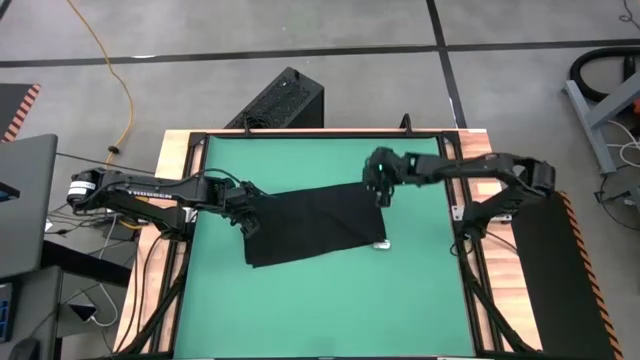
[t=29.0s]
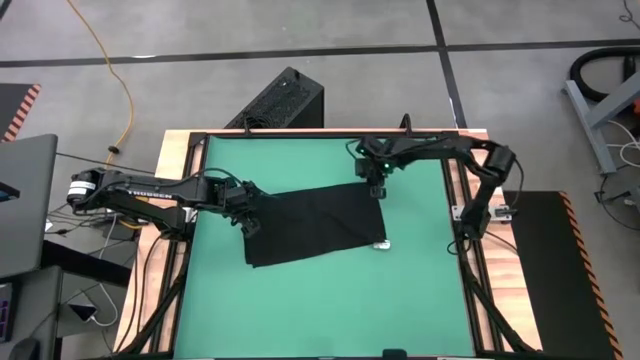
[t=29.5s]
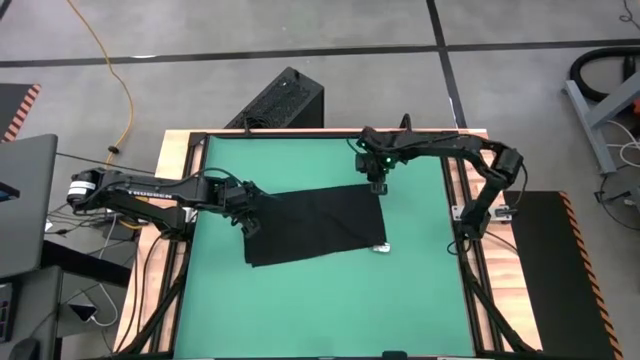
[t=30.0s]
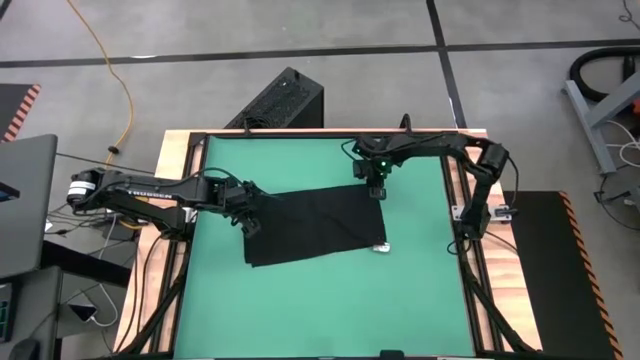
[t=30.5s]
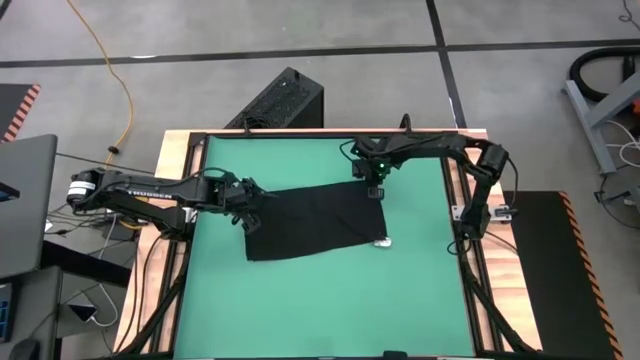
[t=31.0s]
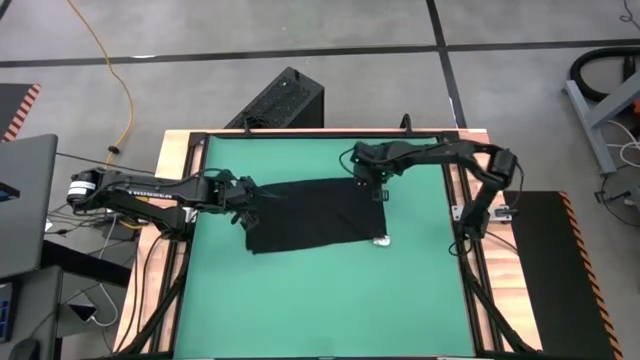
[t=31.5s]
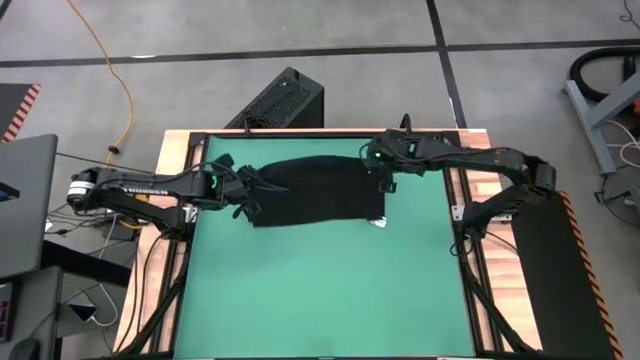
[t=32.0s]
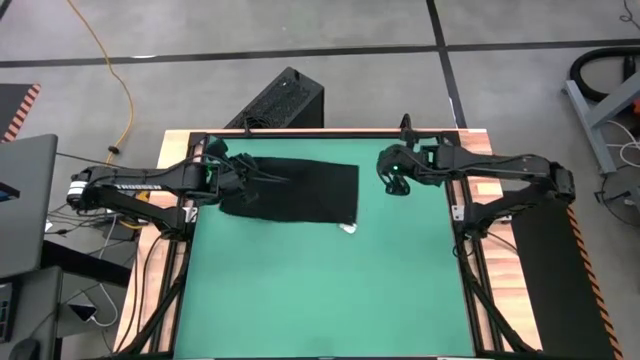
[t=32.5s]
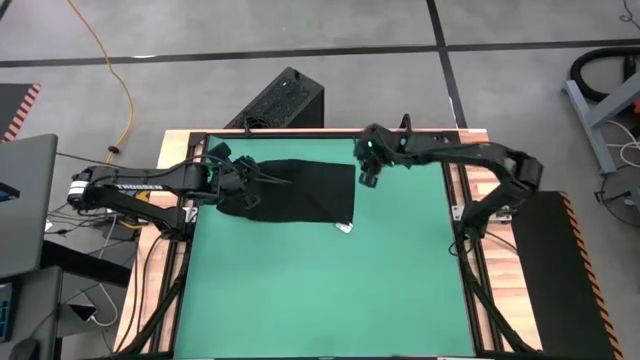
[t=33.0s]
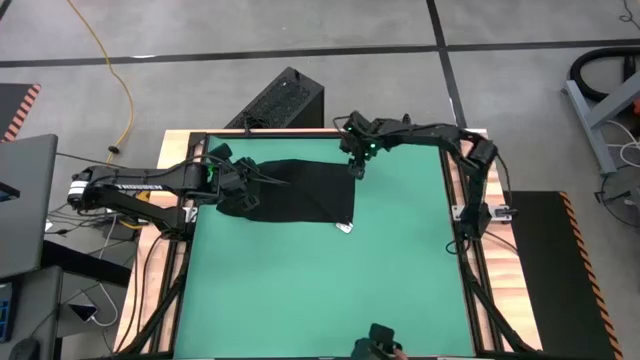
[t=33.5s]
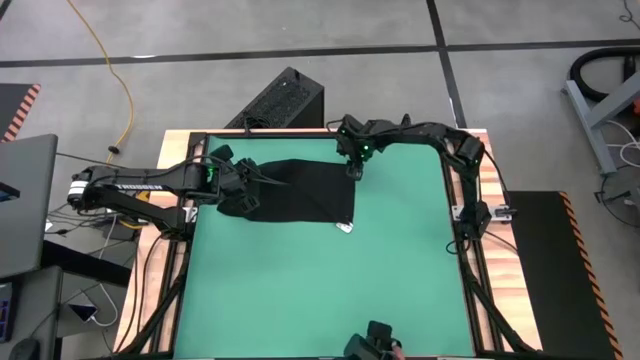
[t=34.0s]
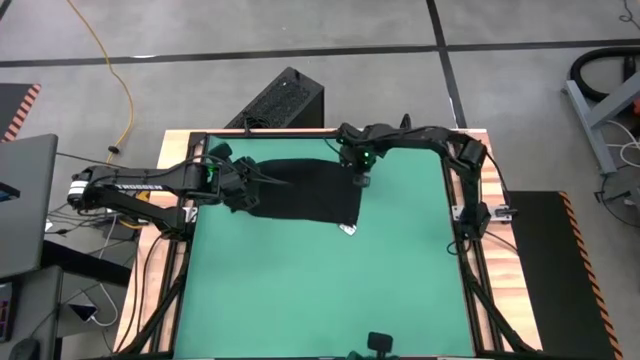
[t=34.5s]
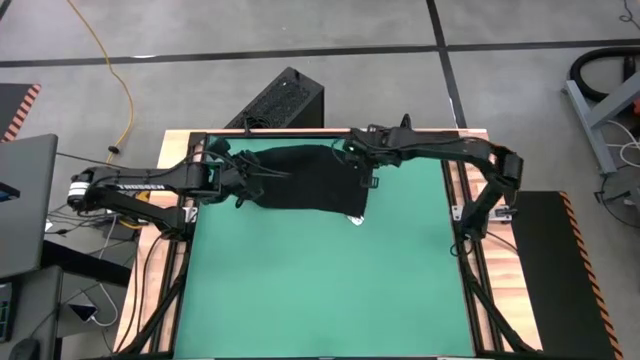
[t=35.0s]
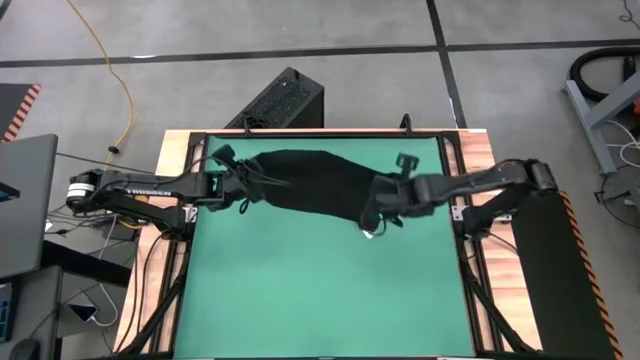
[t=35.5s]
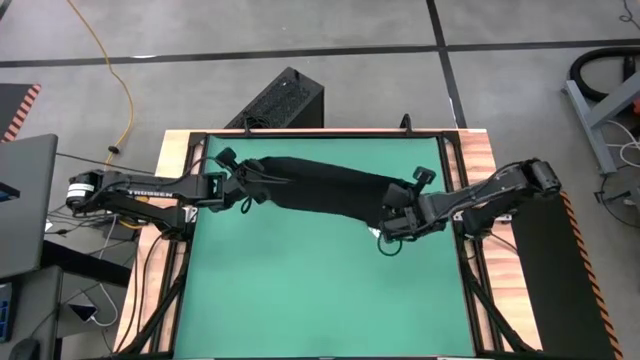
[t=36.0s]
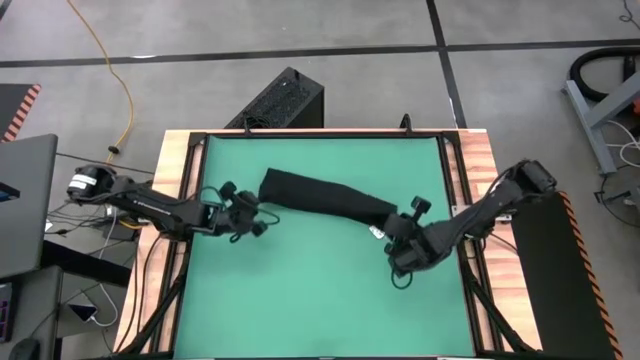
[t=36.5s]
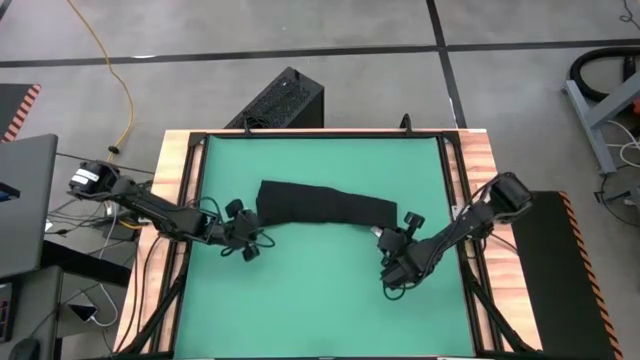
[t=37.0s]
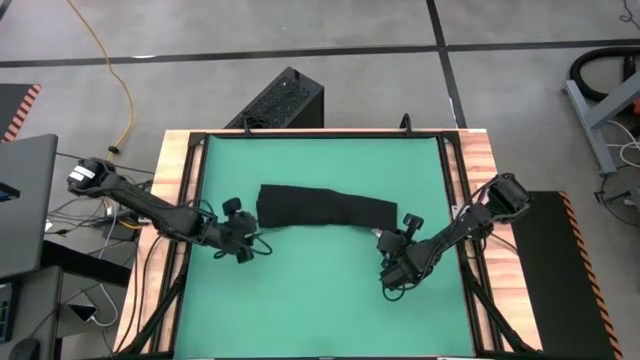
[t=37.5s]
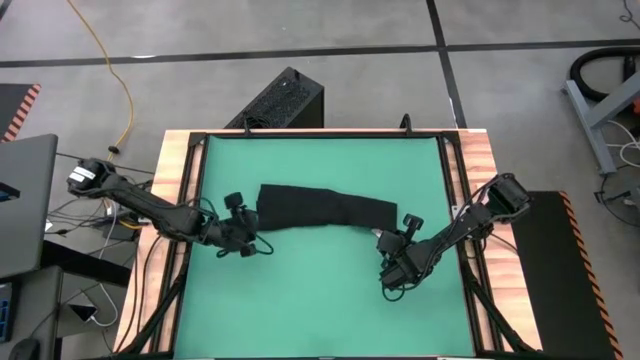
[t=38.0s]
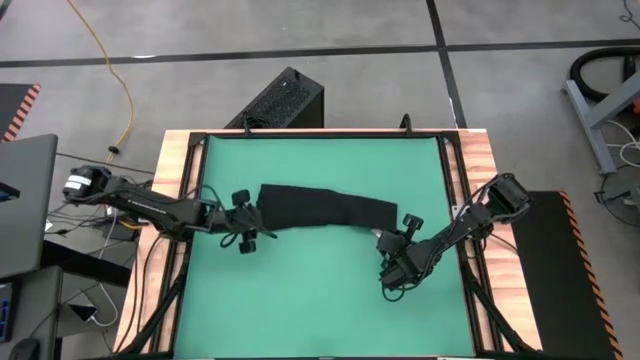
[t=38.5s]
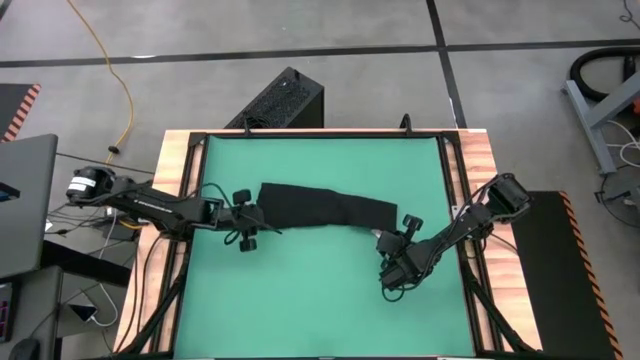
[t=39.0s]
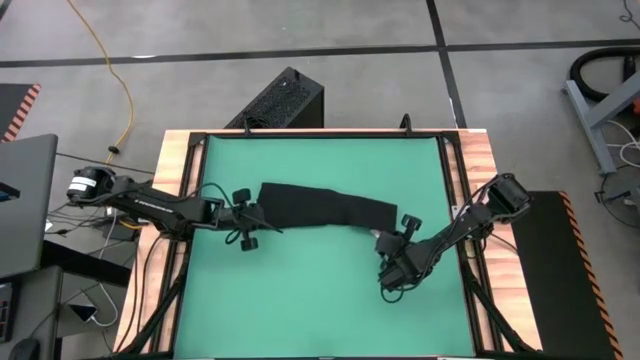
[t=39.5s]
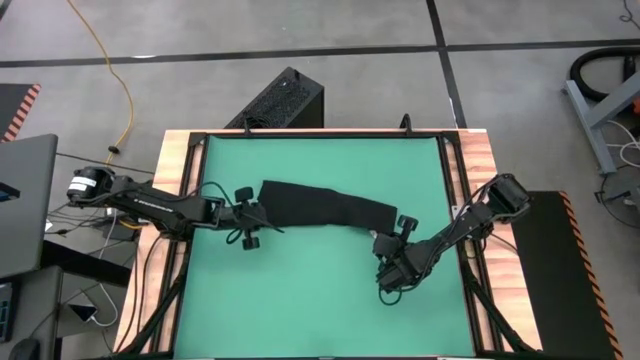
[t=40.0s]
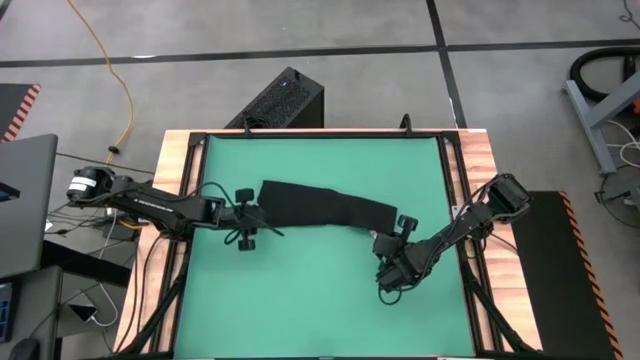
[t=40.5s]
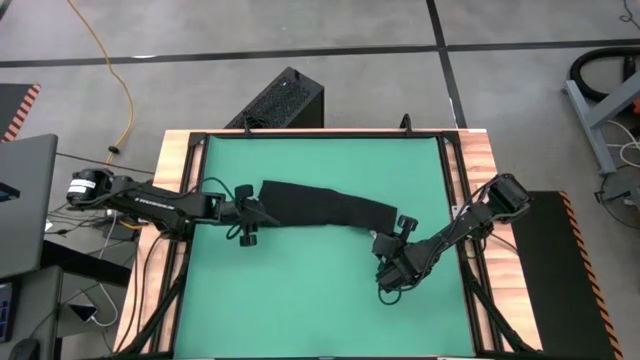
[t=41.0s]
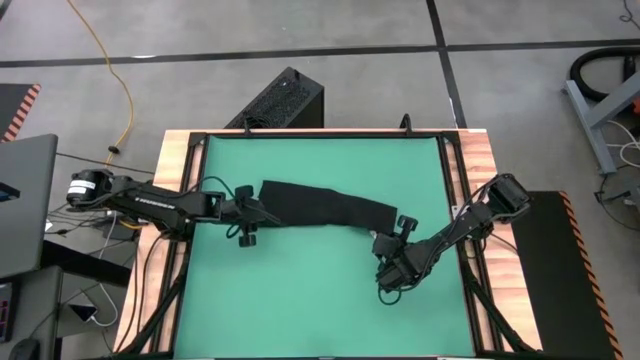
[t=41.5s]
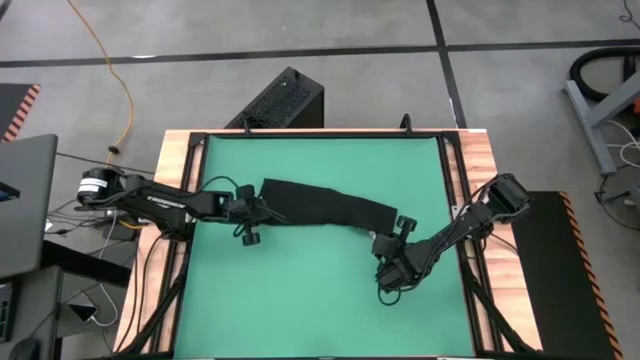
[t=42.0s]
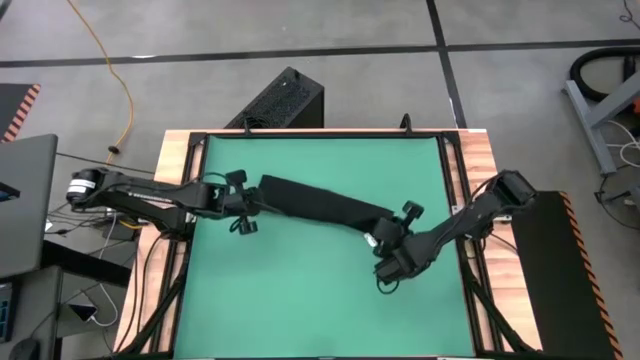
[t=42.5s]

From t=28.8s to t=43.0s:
Task: Roll towel
Roll the black towel
